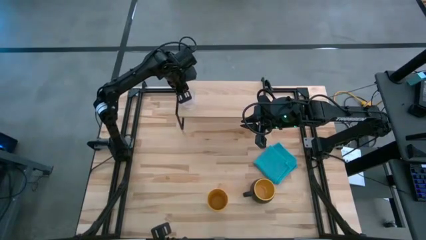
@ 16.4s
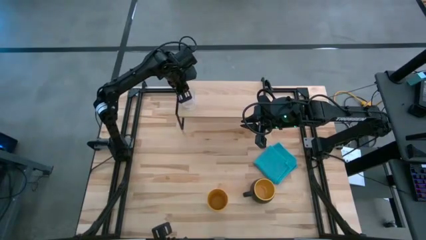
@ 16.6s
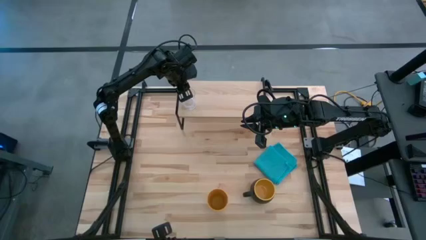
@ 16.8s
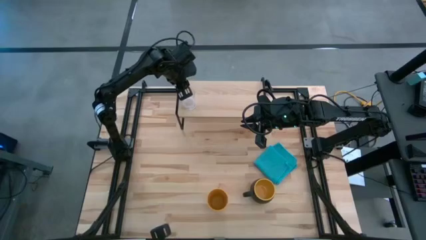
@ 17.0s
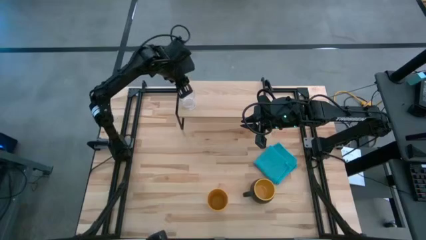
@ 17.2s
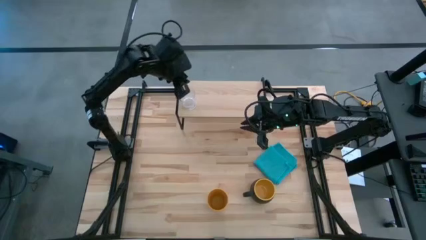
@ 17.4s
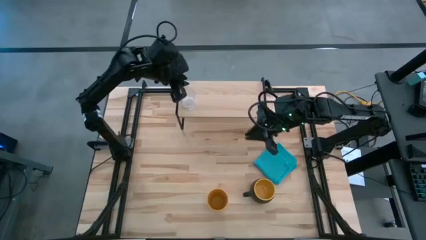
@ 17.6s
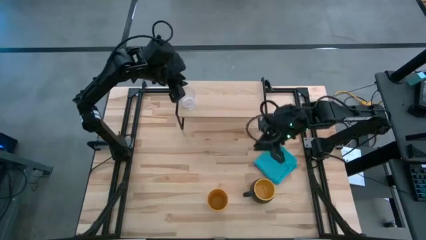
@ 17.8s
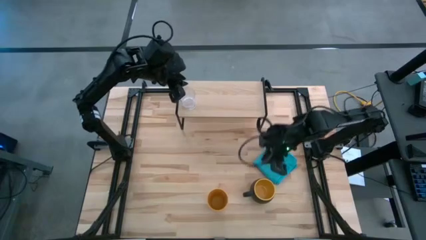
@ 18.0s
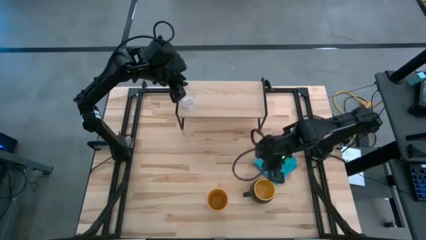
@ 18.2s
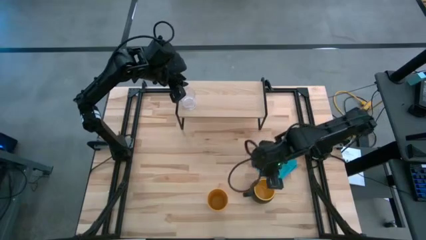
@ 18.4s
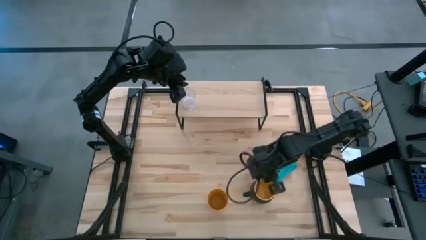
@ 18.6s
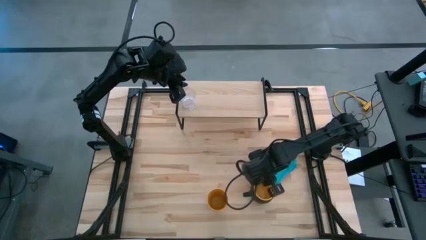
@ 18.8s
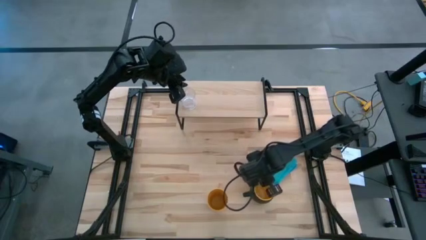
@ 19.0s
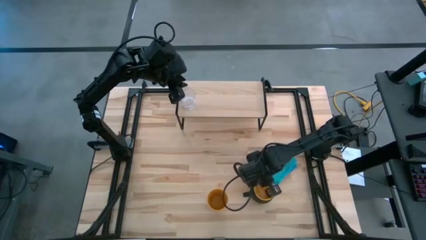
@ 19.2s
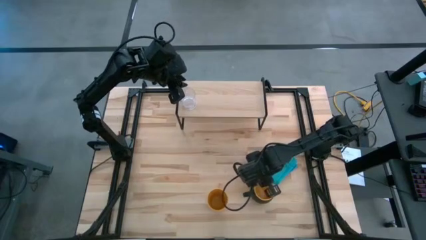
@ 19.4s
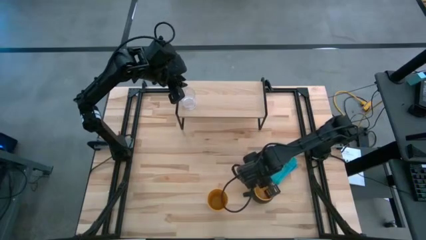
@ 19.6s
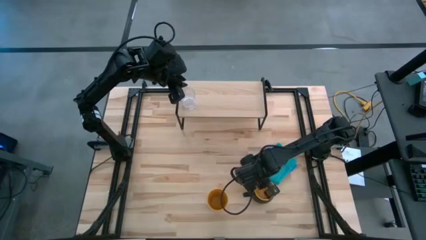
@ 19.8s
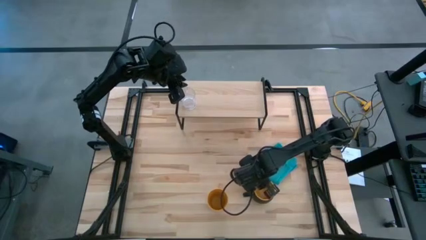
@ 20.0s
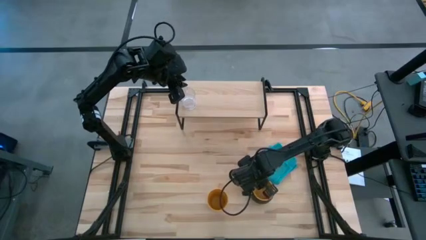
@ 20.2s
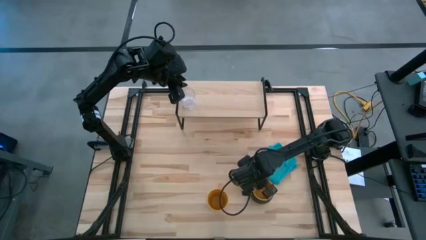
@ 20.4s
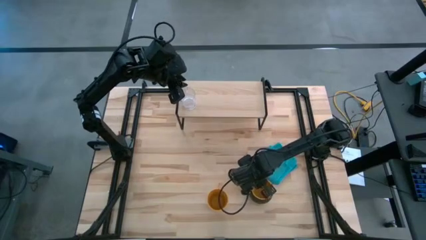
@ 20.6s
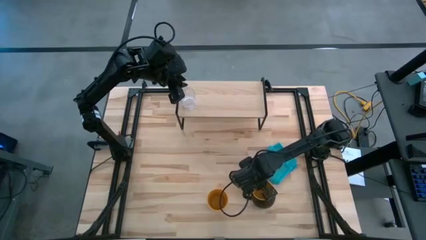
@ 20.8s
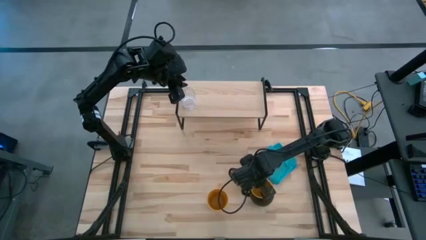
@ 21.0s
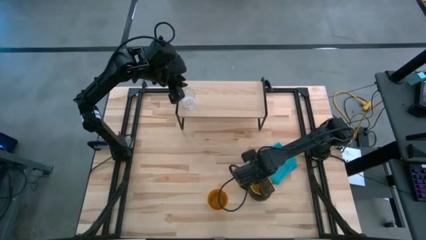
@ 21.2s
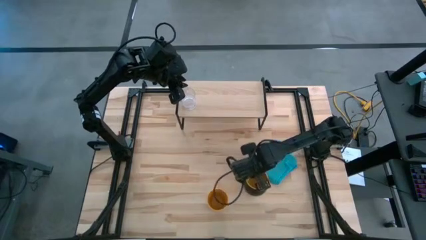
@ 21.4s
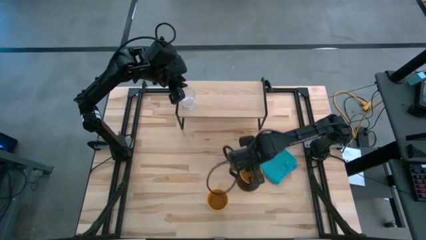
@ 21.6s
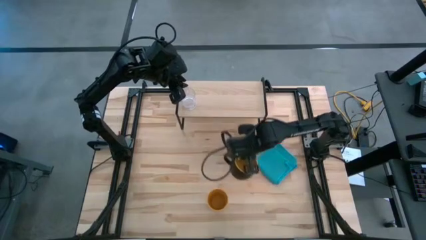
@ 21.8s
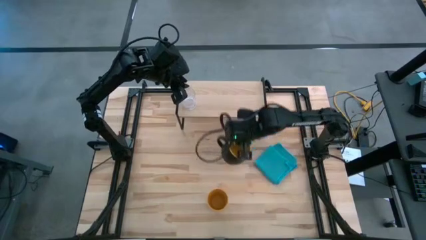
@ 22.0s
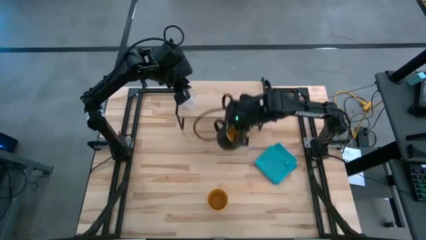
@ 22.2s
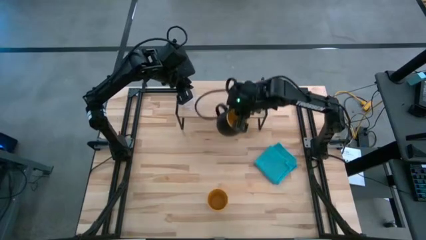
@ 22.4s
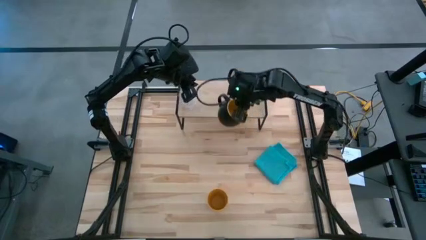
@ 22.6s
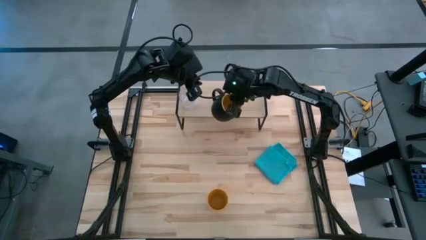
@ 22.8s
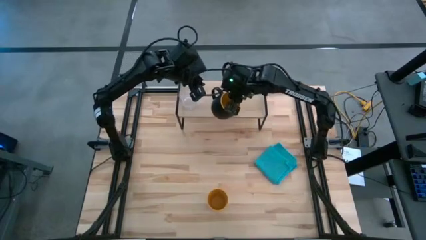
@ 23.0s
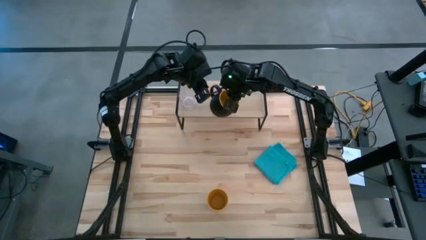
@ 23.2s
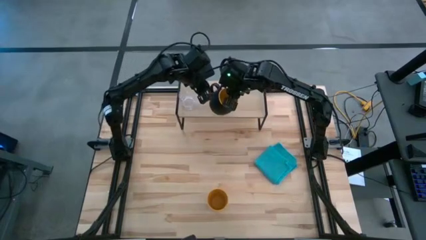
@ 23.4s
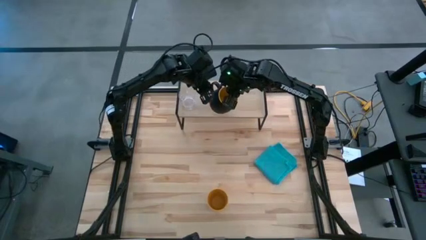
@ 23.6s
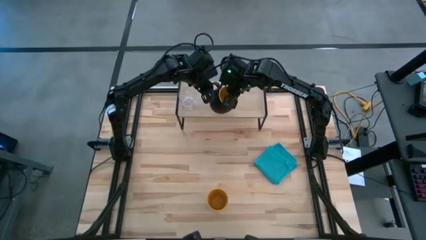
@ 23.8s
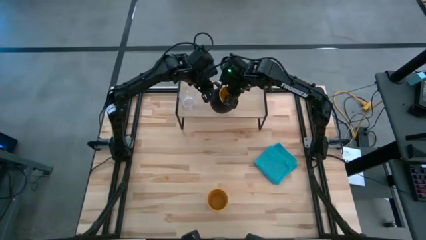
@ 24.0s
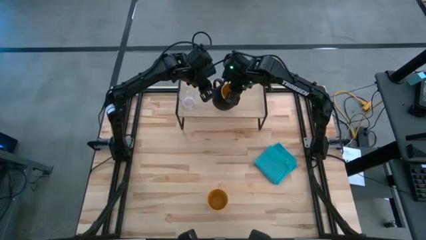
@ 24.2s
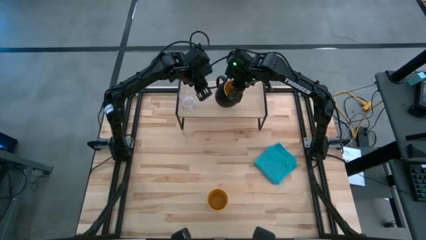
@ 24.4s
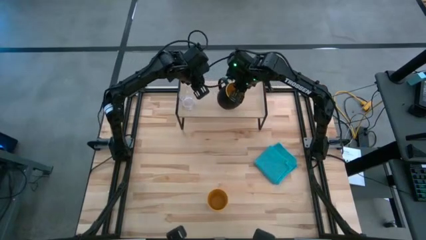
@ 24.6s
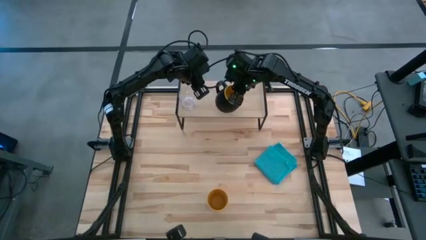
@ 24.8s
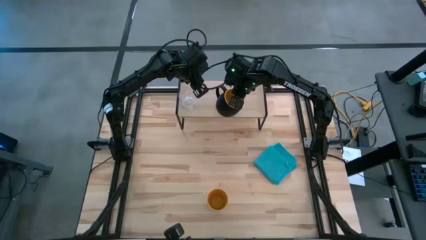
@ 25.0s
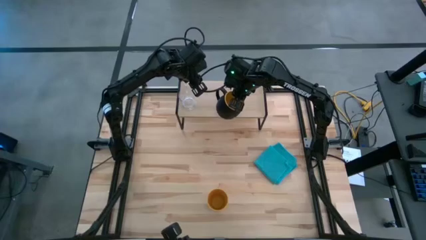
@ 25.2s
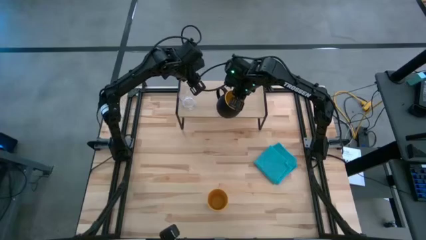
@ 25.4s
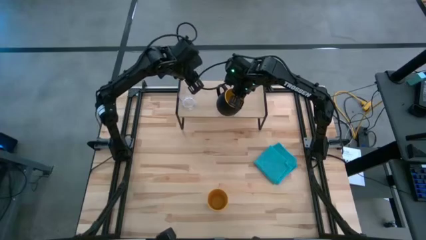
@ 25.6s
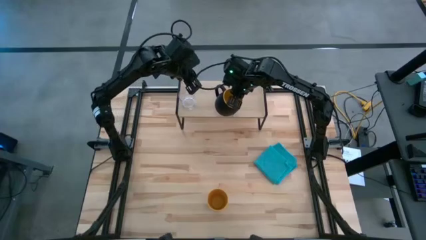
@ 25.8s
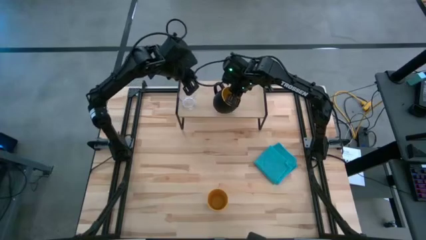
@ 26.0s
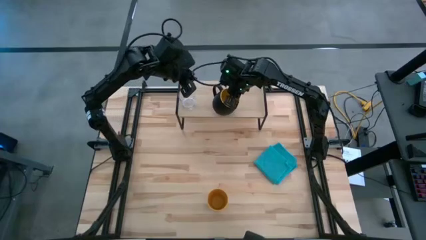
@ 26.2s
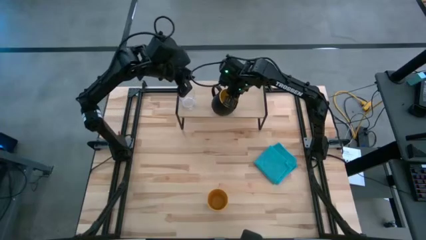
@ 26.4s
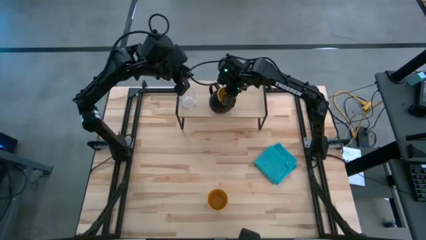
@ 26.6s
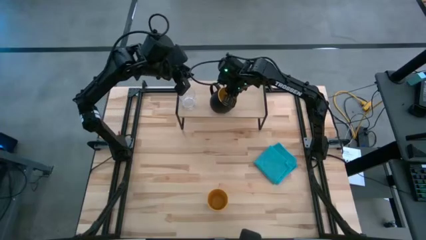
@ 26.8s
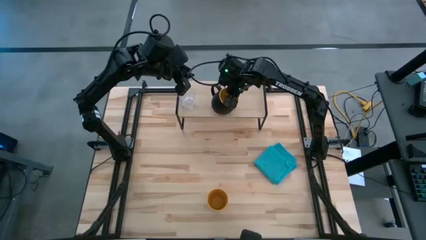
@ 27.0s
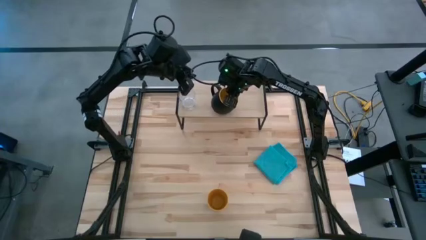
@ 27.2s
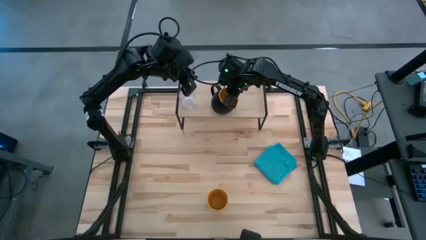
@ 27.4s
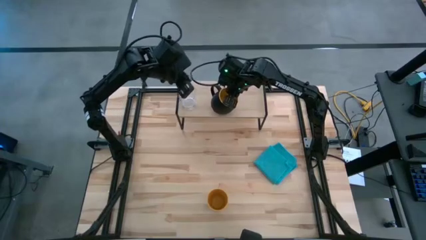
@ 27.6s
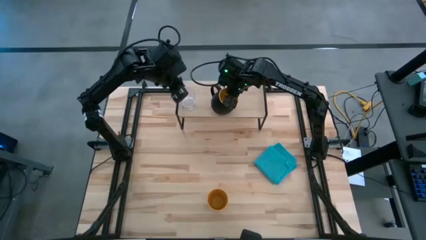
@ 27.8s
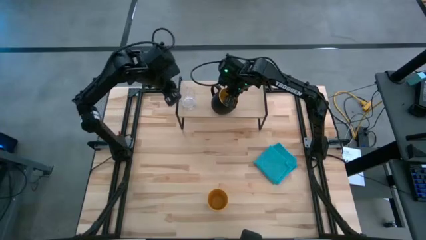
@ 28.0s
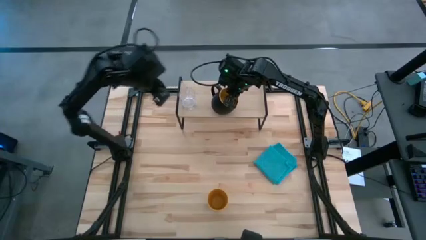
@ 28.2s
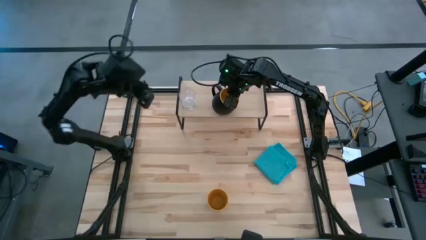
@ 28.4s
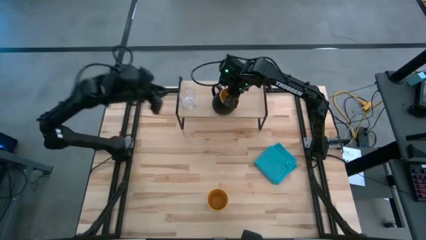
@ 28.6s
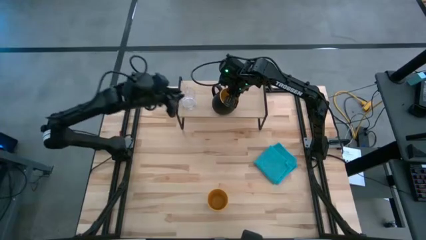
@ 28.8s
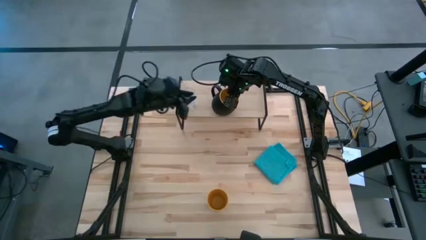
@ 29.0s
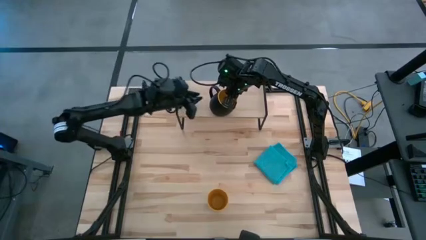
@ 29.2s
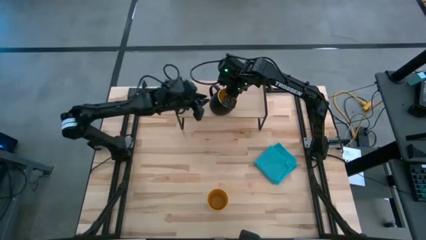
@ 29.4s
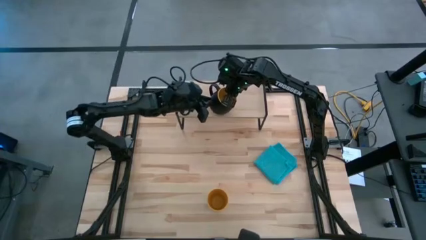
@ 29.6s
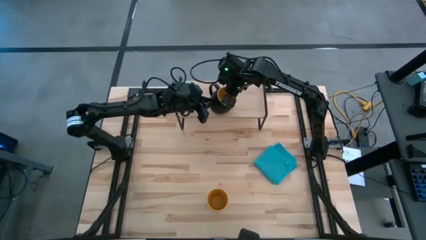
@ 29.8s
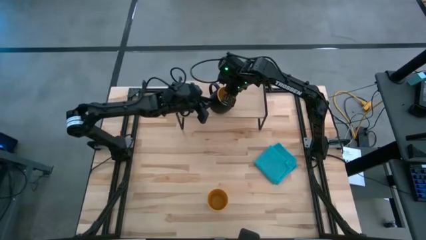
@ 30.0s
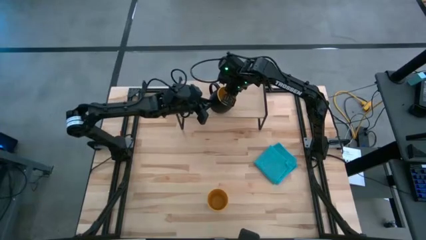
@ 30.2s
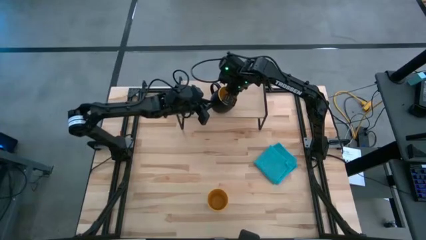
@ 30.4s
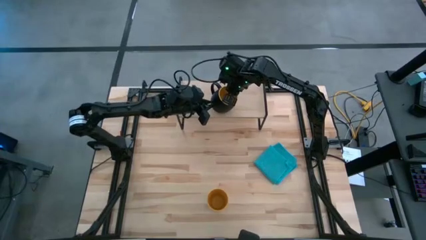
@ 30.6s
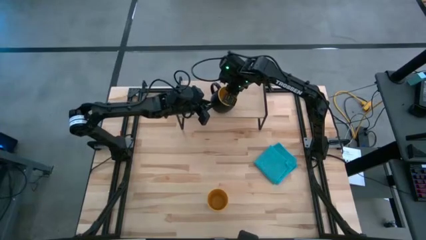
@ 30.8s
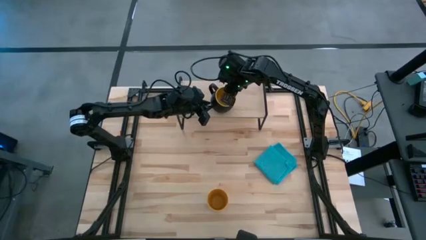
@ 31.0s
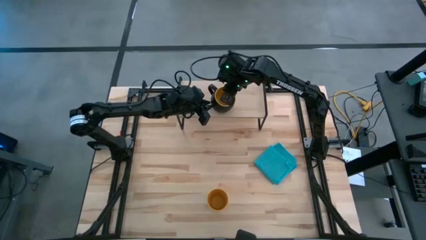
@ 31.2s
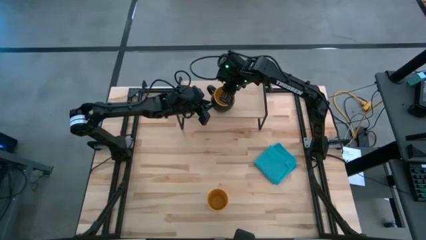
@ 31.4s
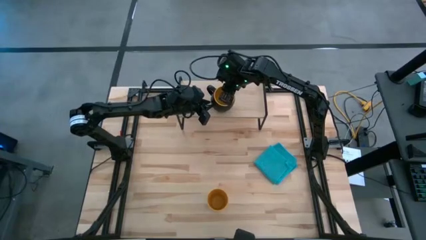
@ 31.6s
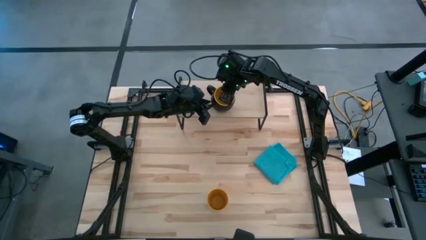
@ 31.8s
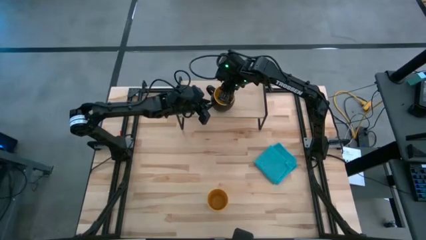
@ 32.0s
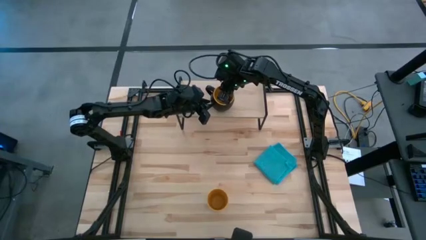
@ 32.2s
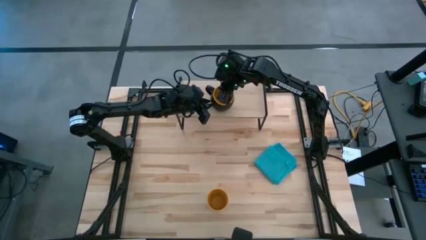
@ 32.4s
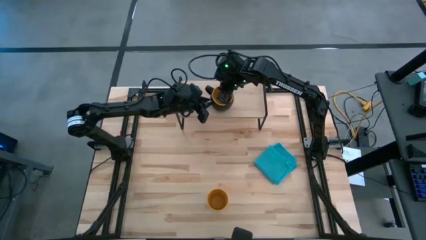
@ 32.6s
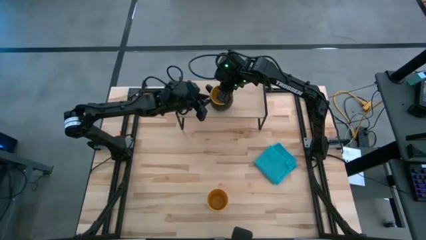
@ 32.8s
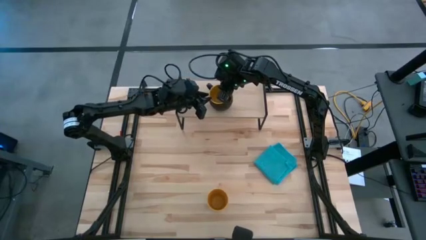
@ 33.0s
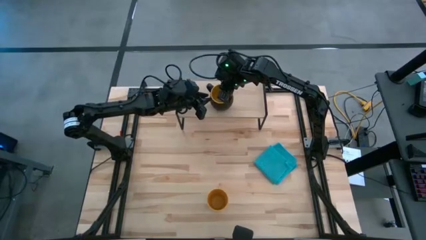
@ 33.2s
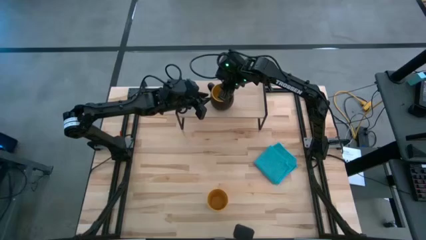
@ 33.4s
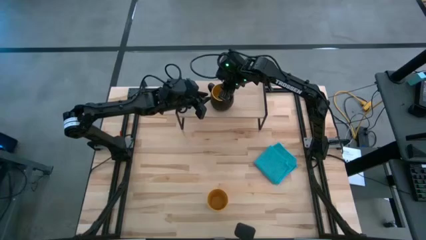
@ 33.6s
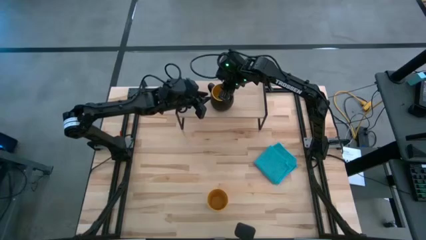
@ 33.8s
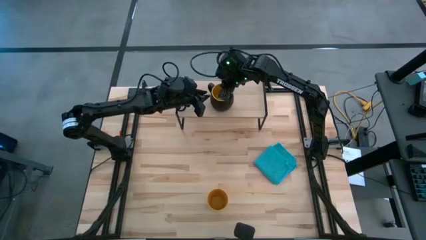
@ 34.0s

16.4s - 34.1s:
Task: Stack small to large cups/mugs on shelf
Put the black mug on the shelf
